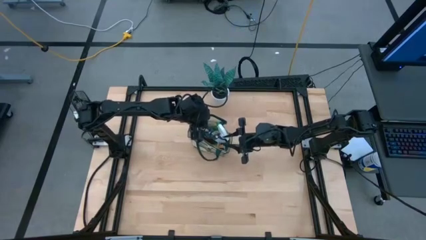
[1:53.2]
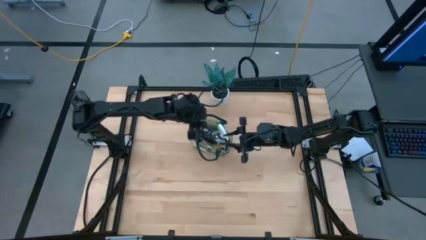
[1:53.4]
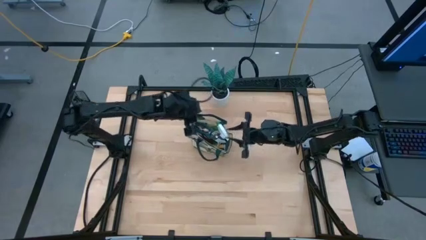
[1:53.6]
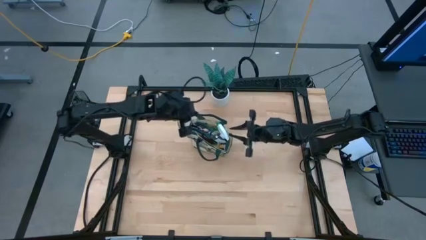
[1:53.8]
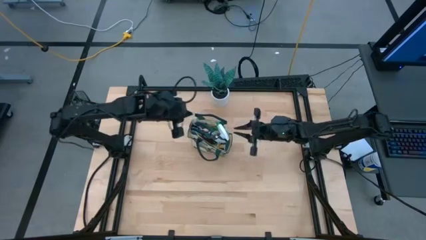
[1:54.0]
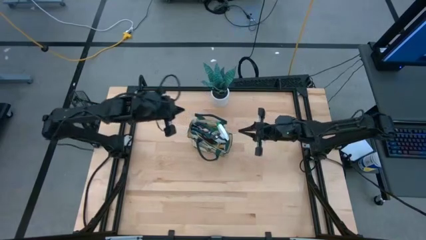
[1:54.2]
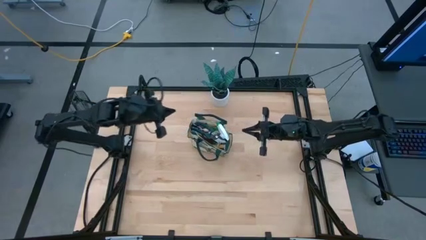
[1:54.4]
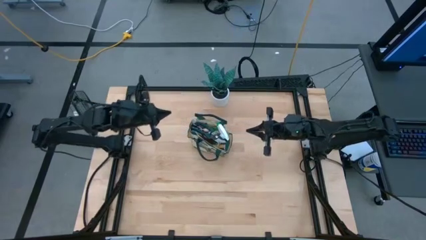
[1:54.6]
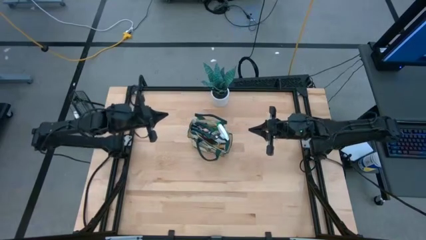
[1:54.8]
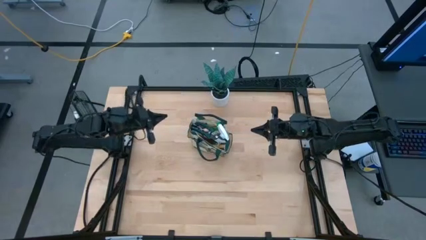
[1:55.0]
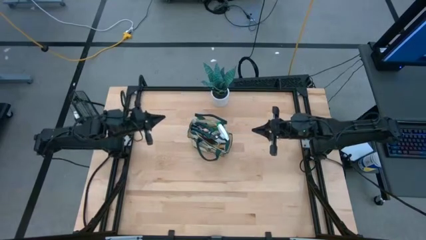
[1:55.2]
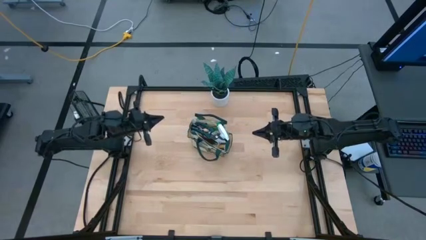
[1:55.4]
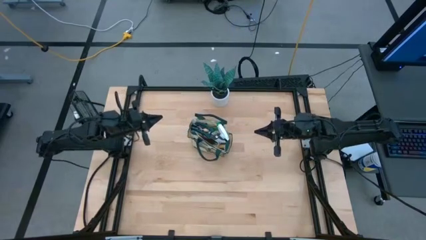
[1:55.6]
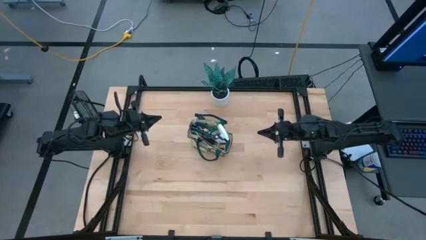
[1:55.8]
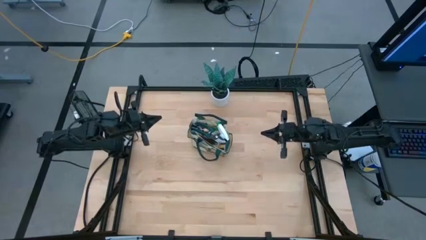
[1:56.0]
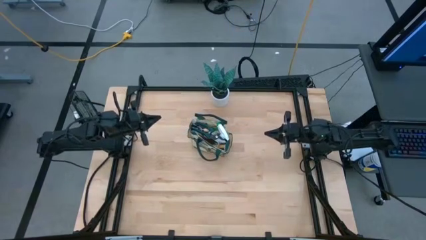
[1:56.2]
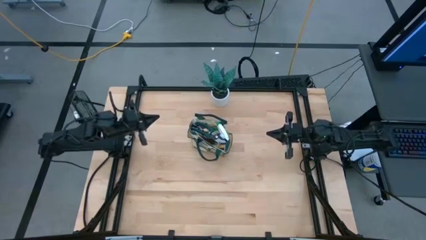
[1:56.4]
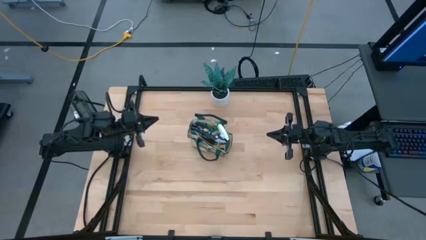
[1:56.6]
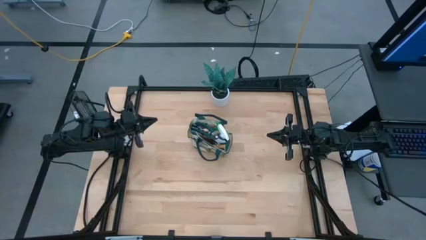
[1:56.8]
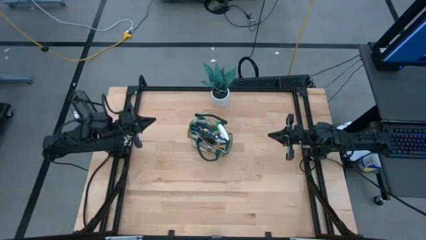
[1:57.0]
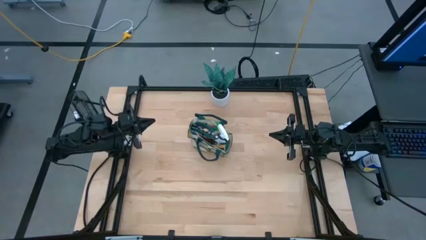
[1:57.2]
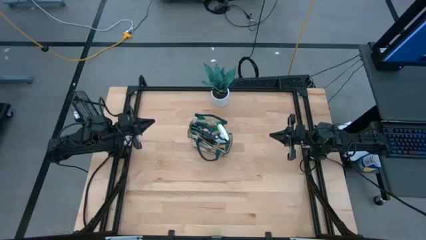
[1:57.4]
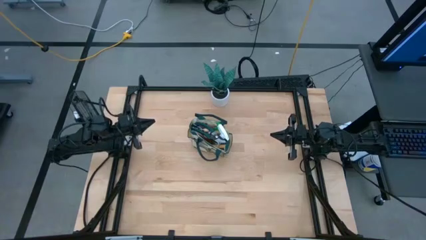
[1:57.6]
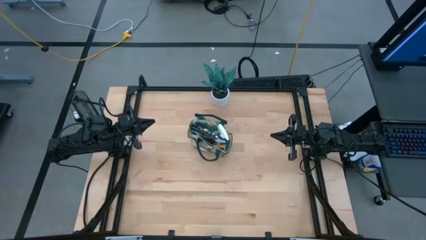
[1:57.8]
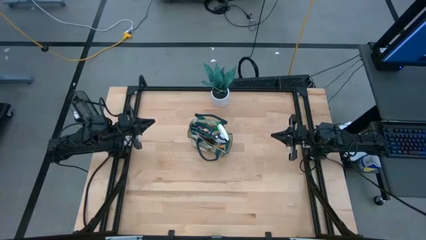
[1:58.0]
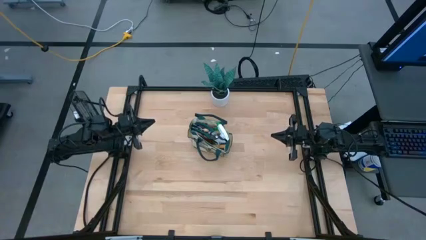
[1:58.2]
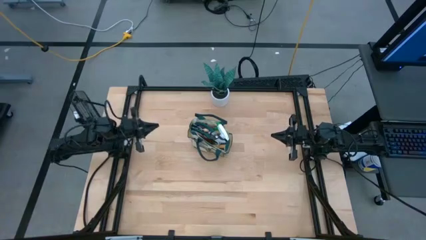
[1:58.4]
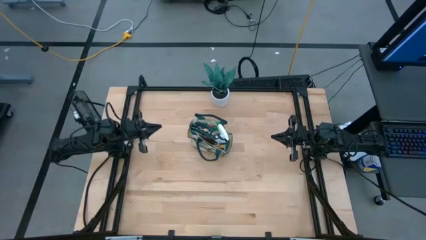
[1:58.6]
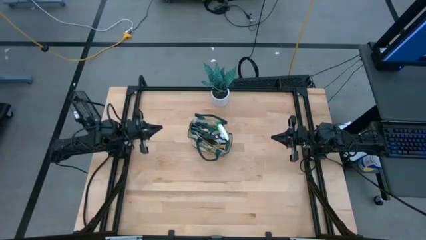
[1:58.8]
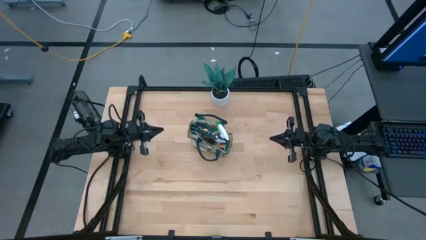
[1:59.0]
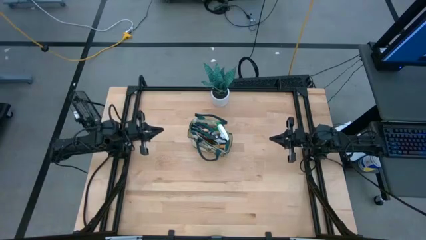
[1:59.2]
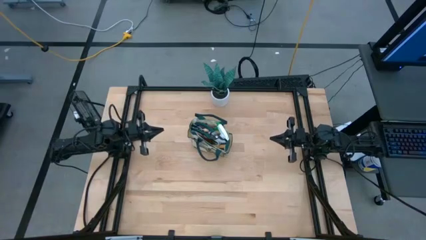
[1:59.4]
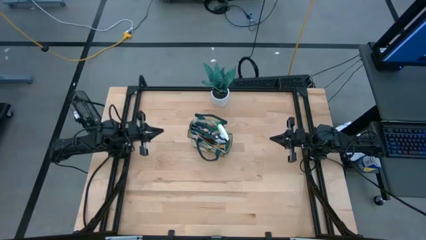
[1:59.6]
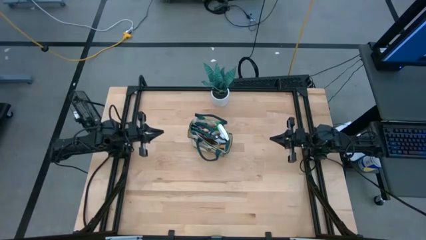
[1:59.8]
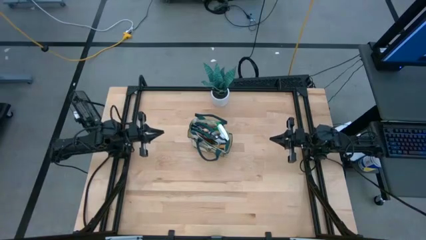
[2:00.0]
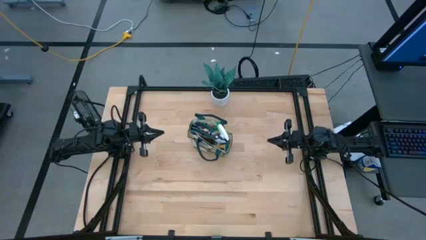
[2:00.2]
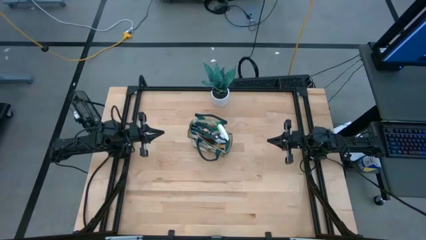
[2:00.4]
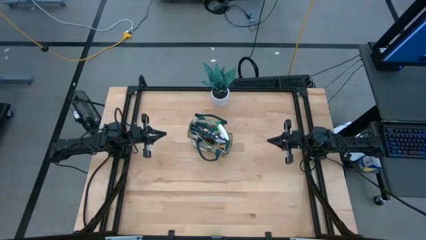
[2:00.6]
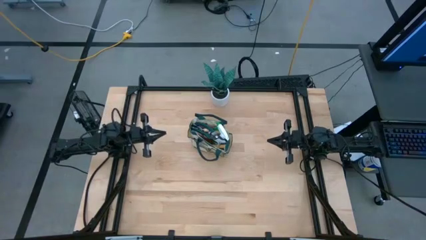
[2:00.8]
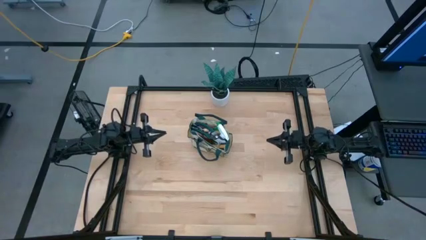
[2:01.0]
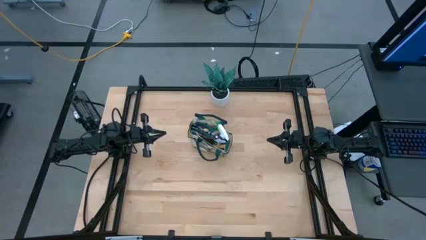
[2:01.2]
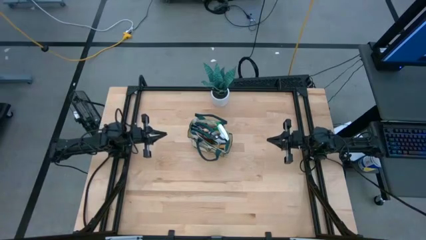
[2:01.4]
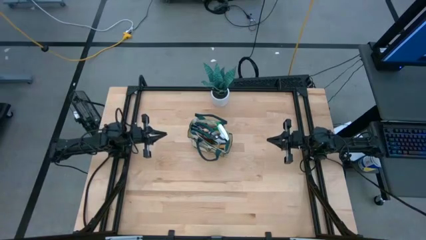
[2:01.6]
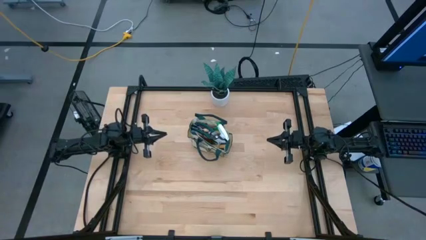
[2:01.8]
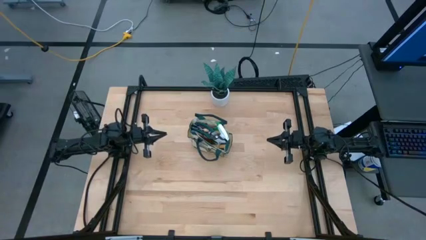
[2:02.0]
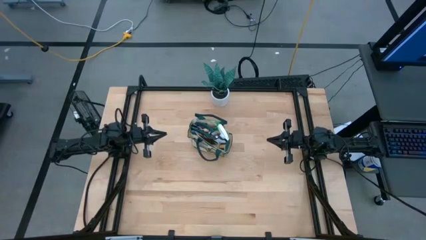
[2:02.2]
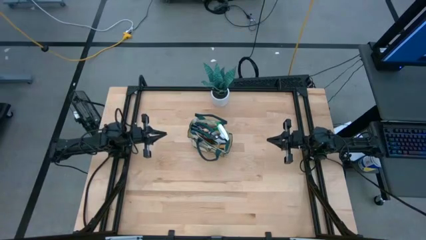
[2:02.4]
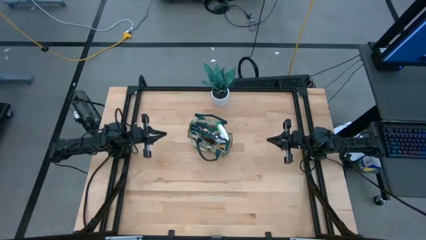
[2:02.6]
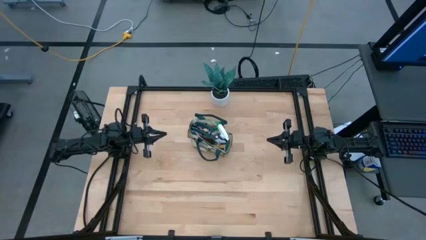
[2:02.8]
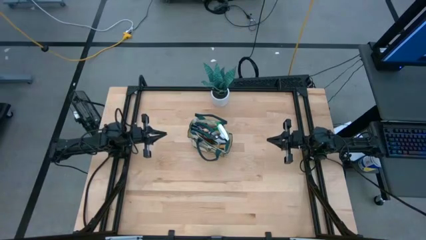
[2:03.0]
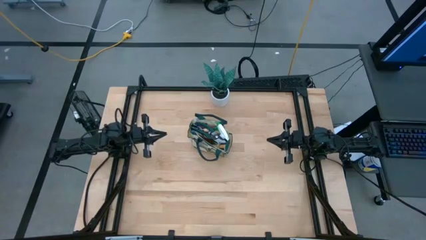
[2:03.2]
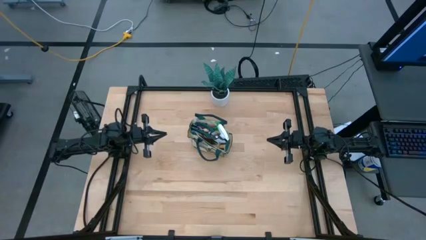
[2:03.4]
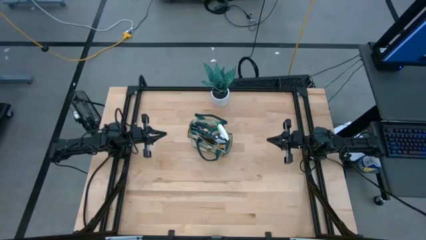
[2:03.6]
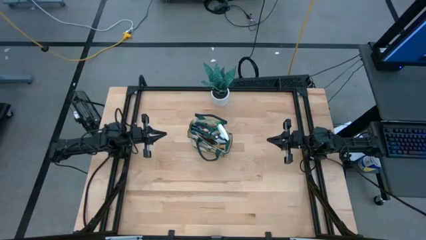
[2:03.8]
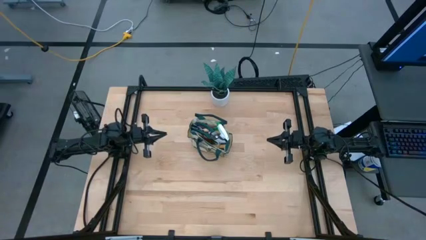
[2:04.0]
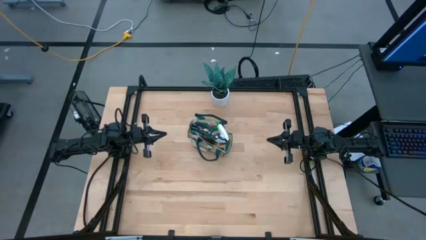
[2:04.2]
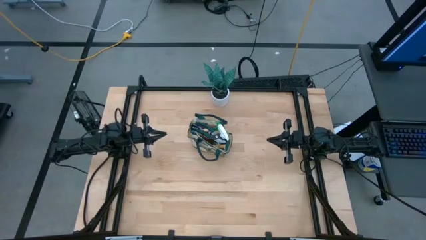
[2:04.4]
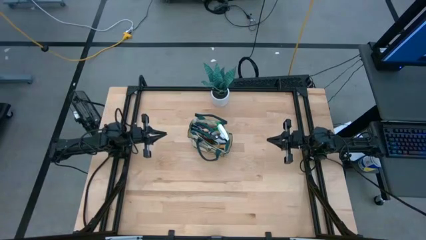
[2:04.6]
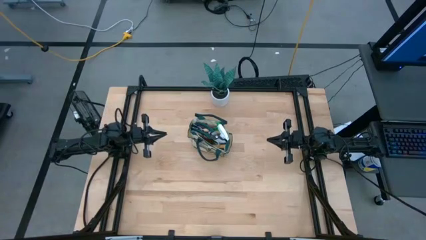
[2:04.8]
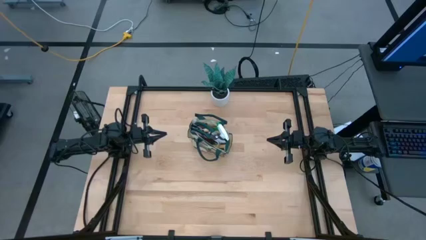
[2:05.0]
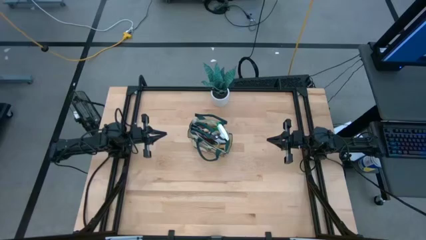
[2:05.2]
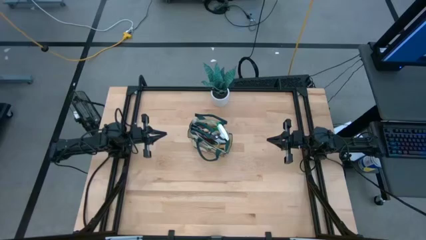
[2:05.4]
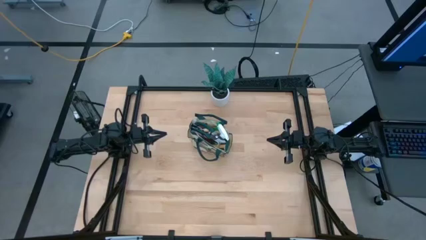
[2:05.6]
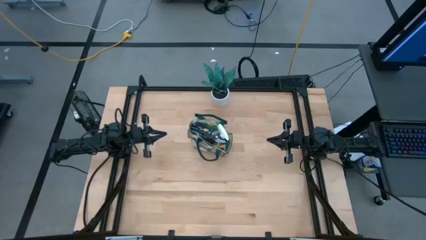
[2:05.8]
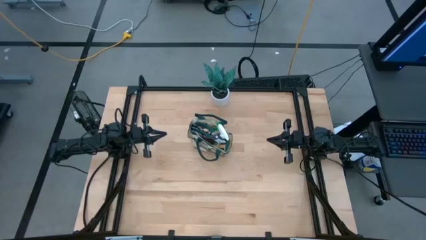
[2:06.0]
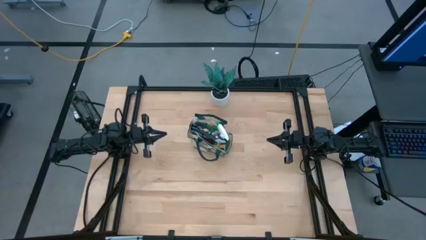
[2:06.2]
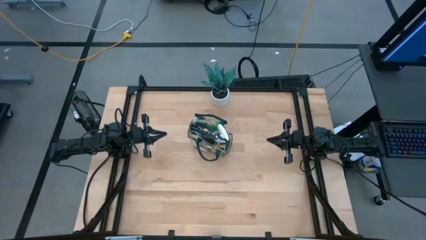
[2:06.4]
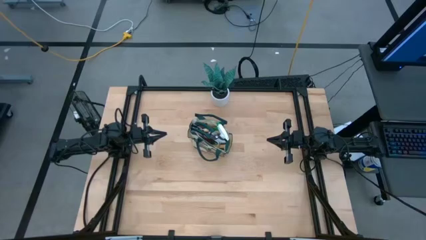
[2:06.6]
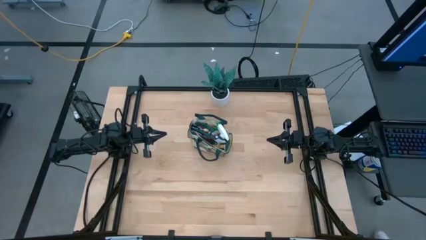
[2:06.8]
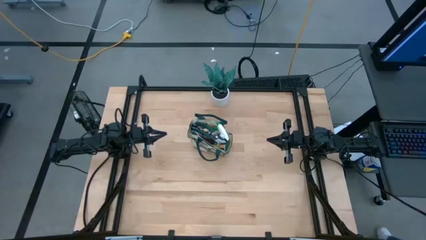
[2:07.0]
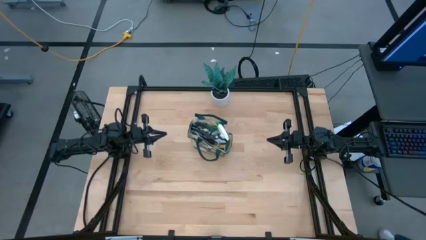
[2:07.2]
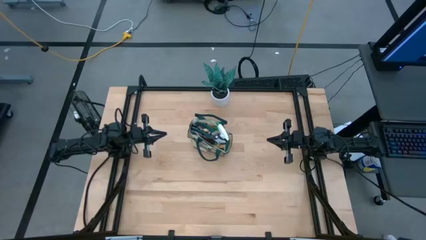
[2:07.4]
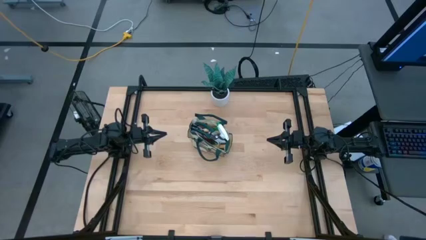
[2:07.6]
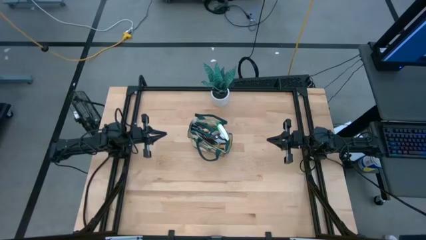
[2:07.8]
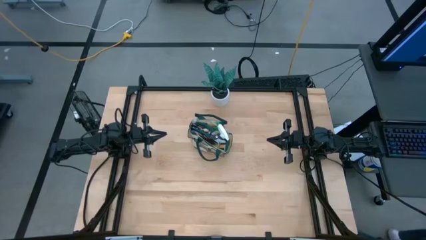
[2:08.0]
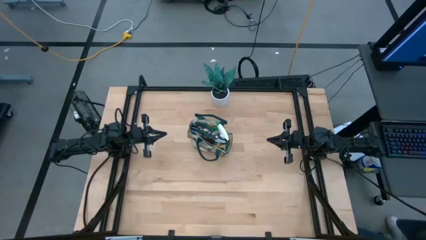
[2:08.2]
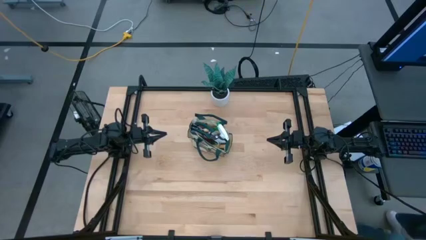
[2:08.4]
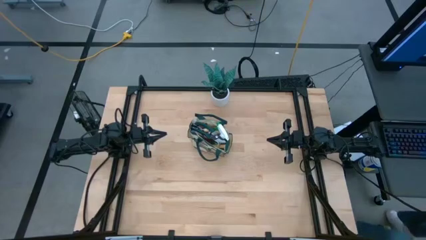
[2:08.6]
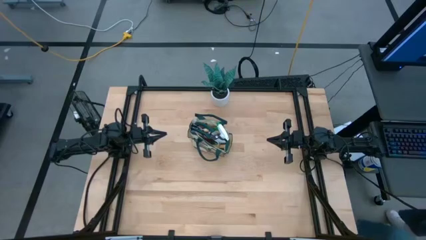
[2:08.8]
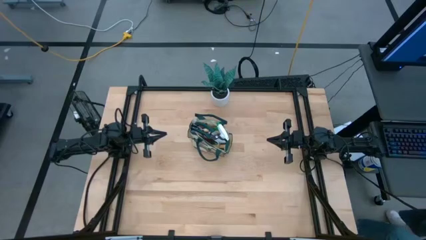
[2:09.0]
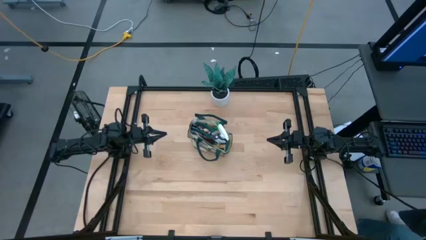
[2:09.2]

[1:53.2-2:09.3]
Task: Pick & Place Garden tools in Gardening bag
Return to Home Position
